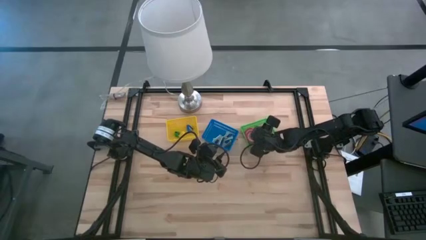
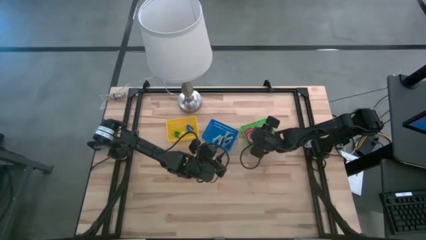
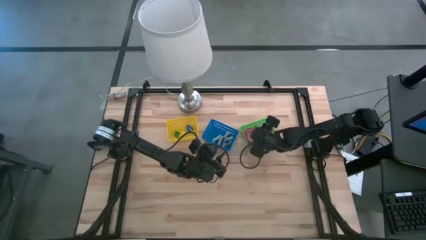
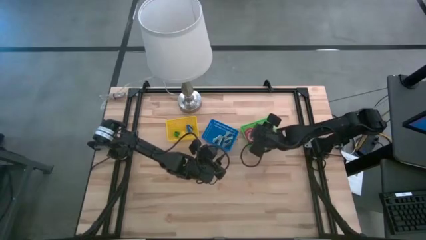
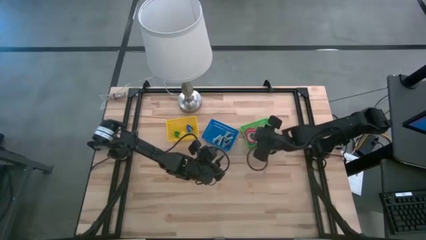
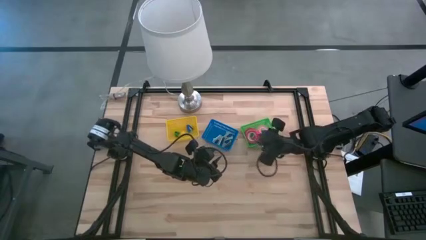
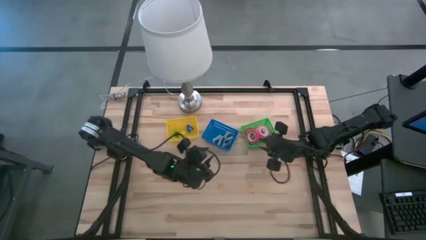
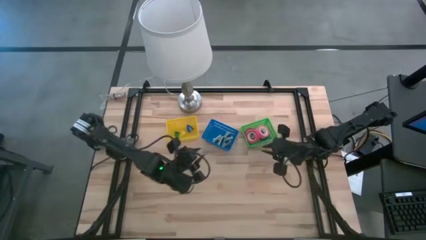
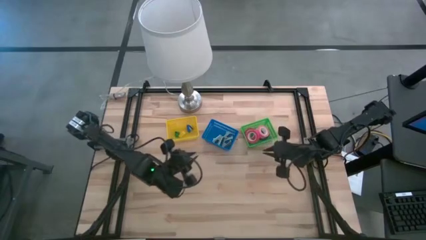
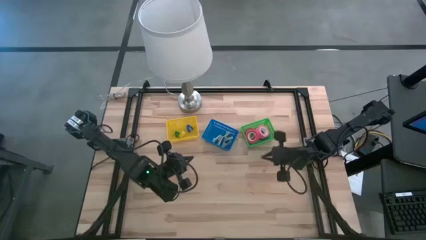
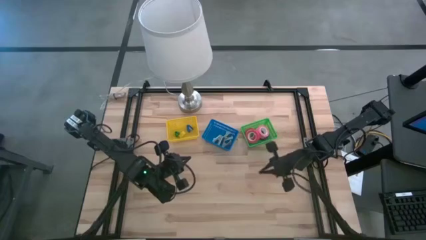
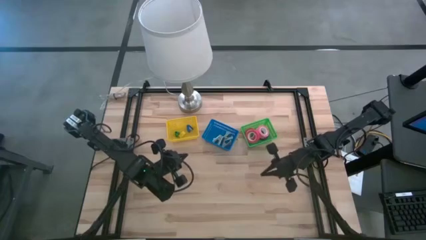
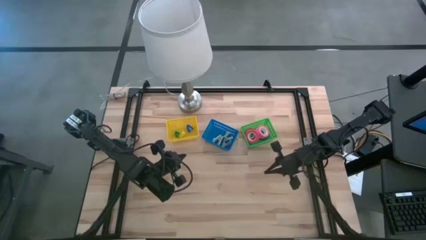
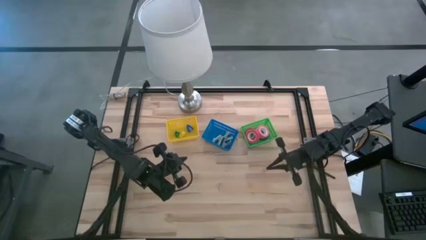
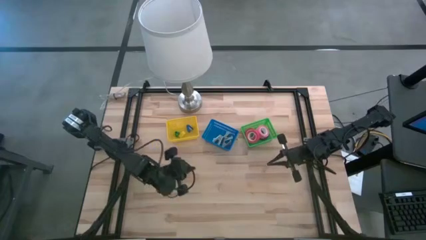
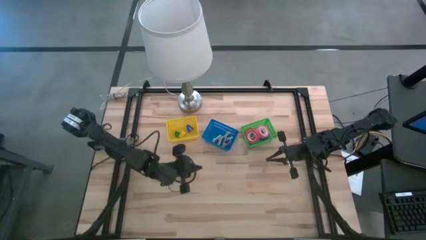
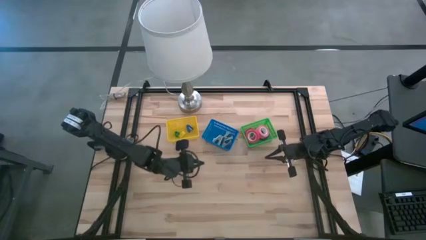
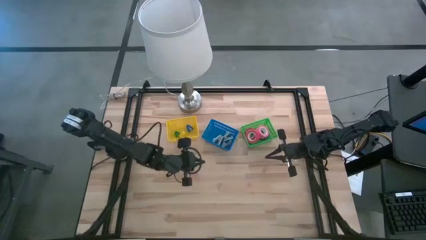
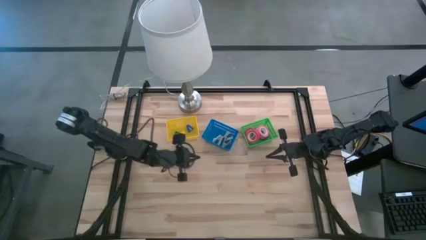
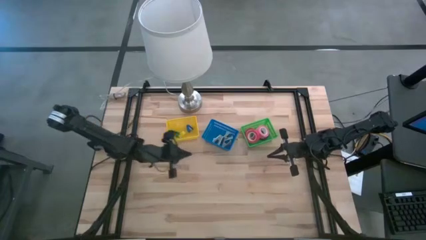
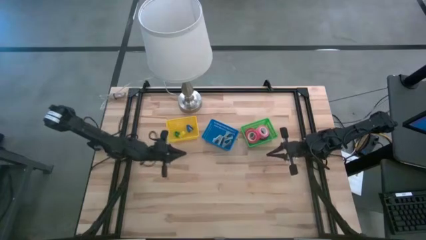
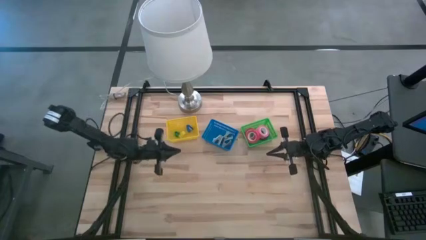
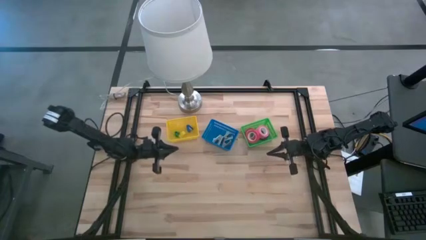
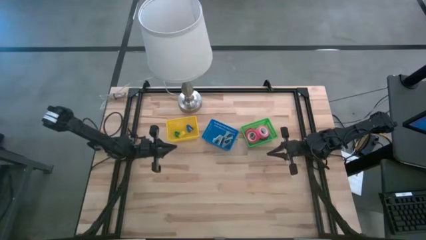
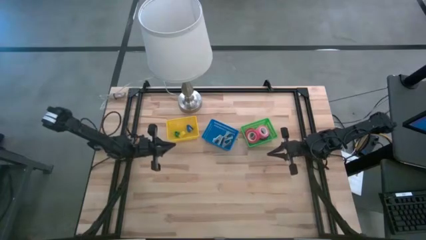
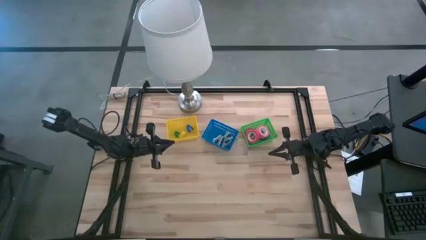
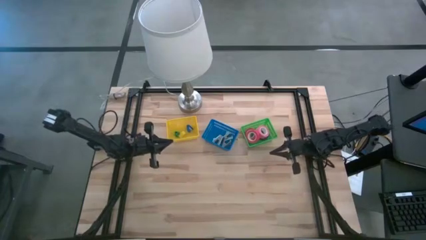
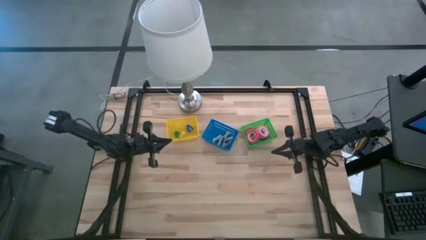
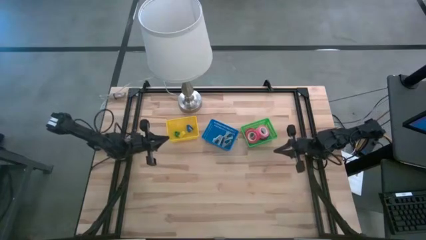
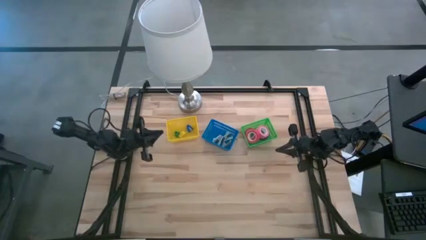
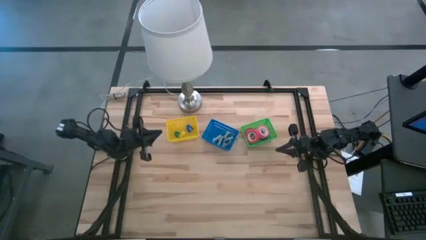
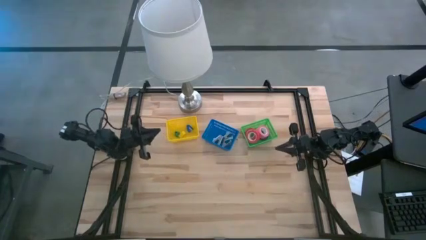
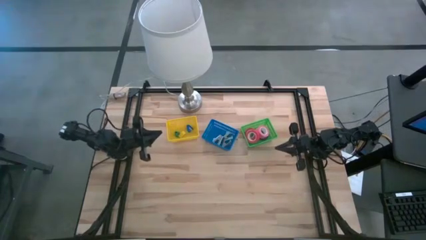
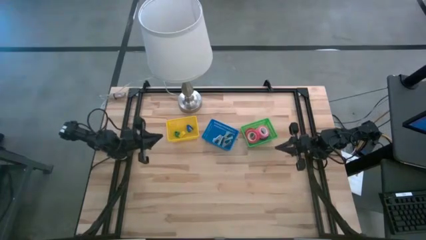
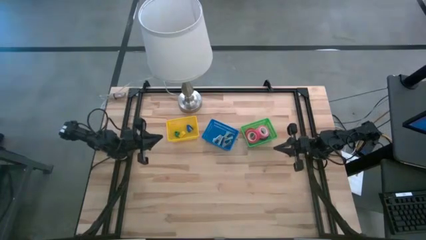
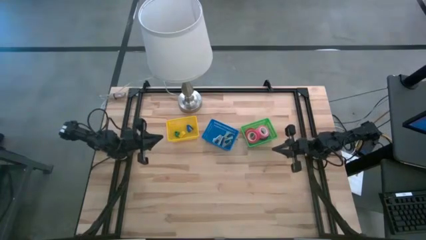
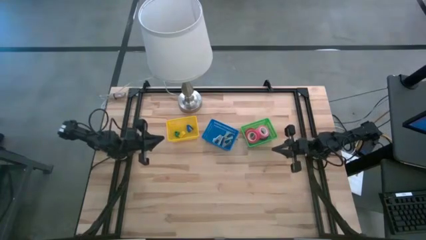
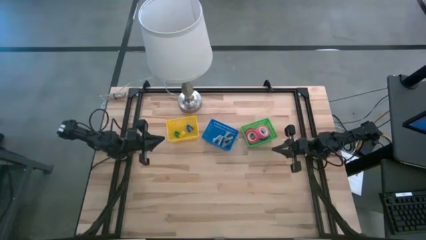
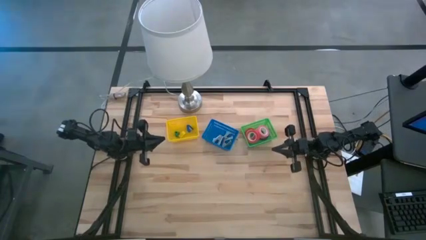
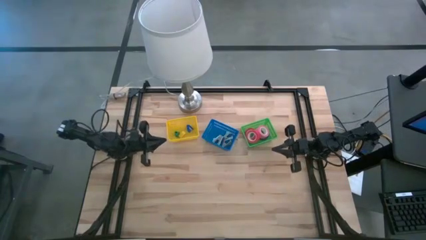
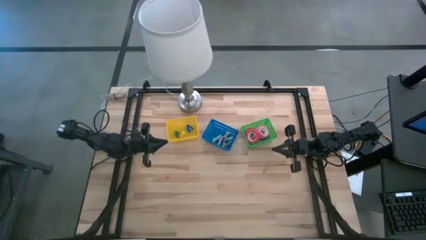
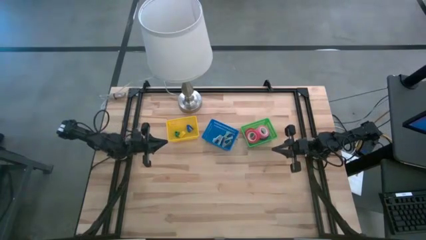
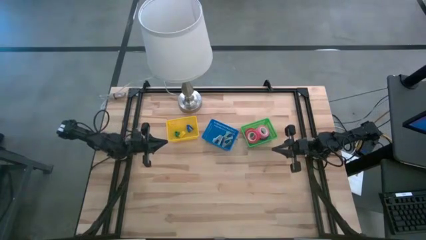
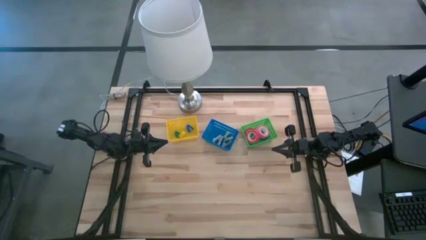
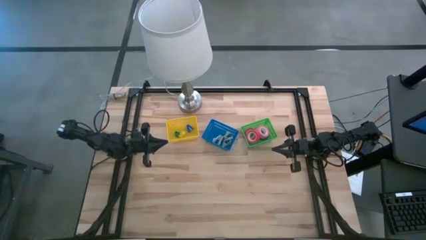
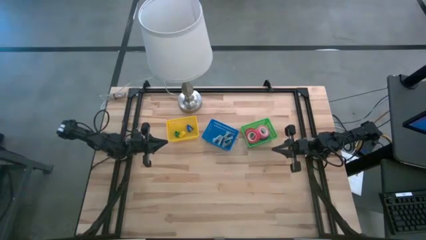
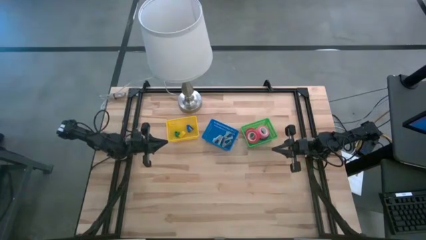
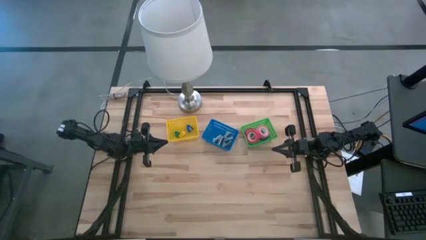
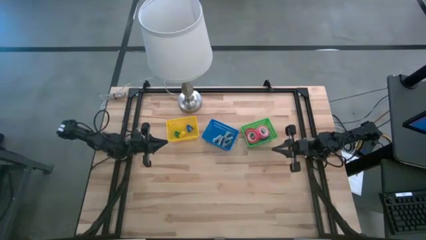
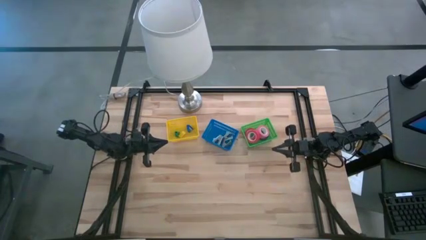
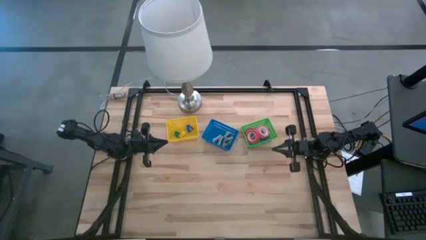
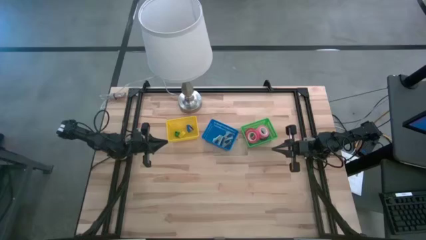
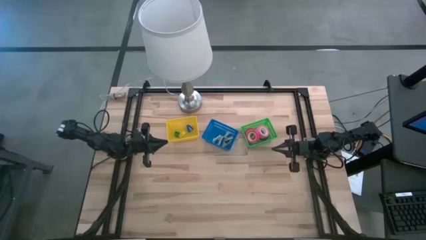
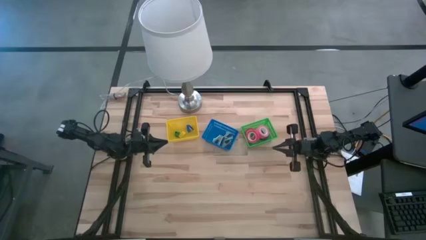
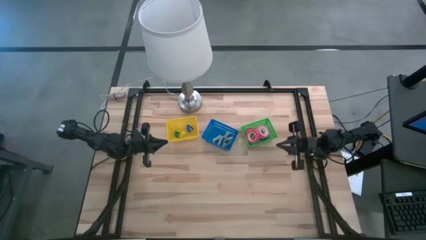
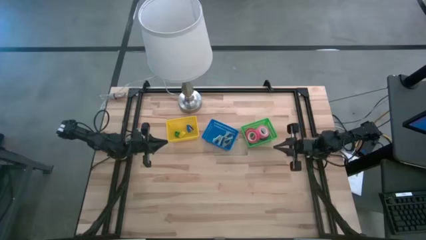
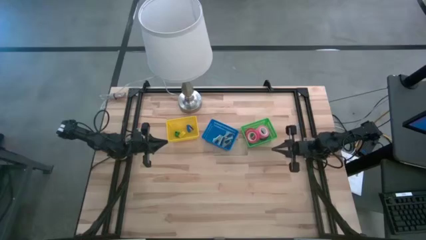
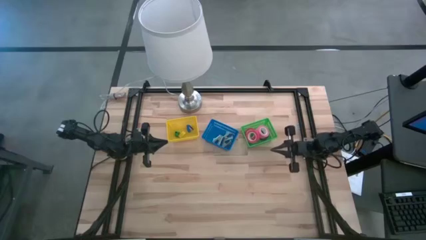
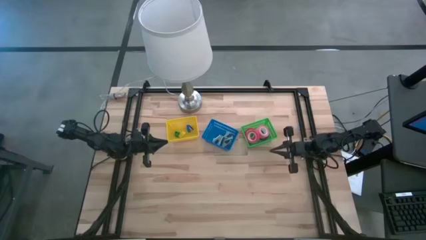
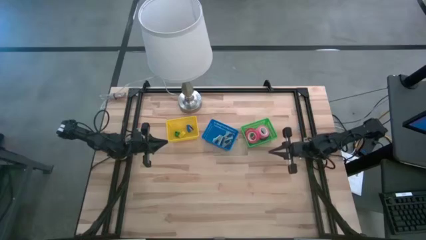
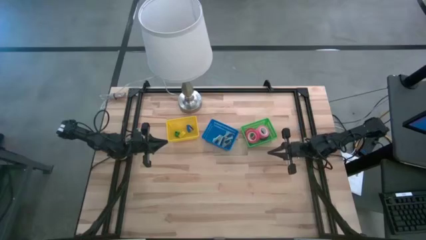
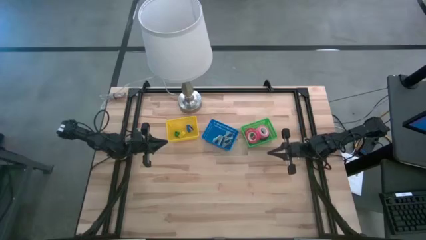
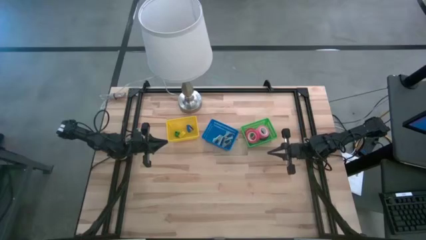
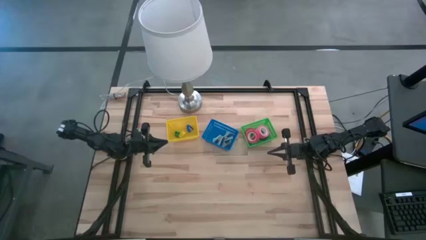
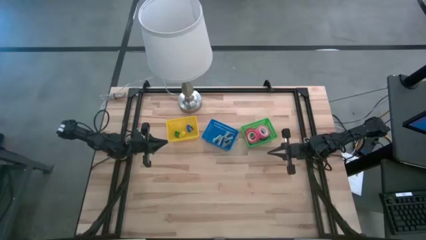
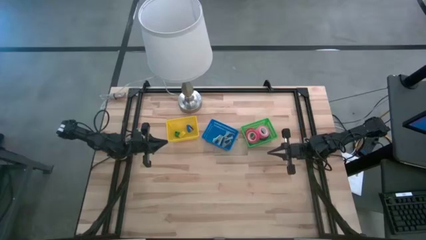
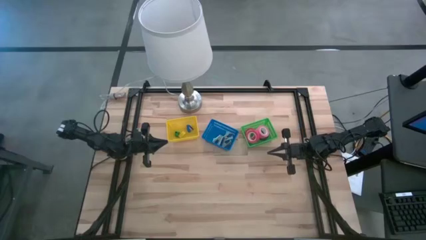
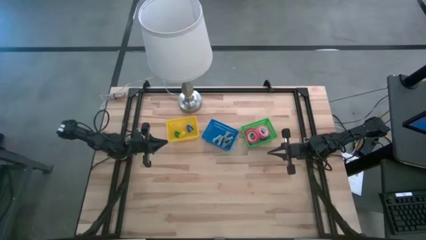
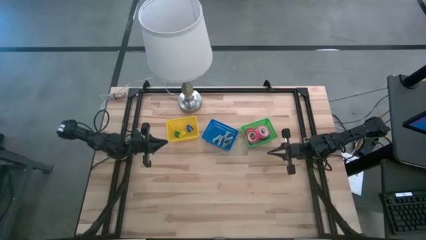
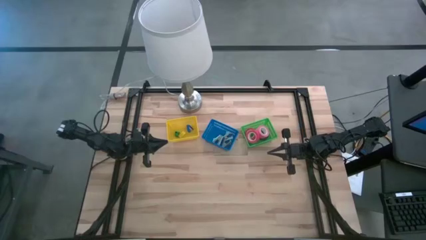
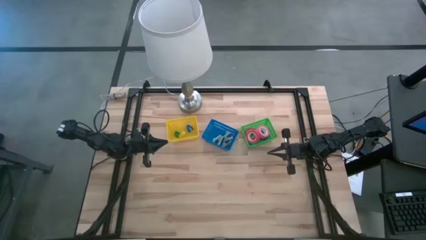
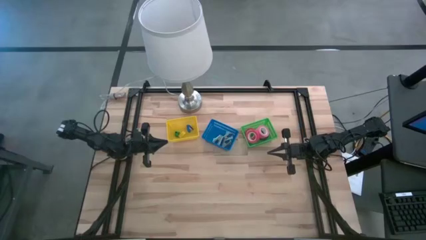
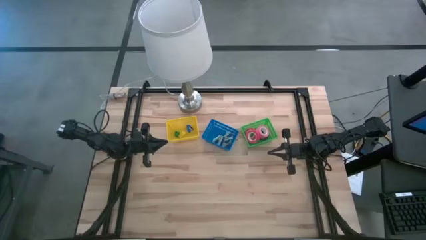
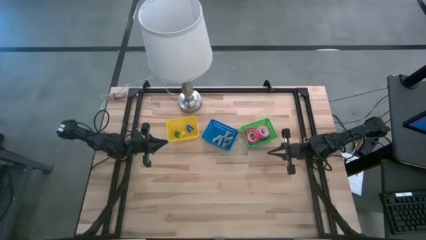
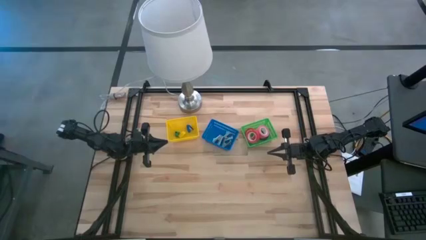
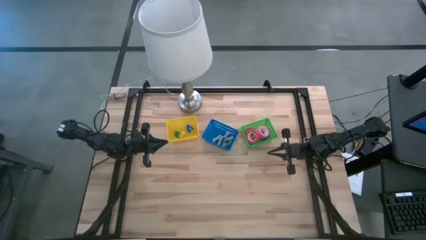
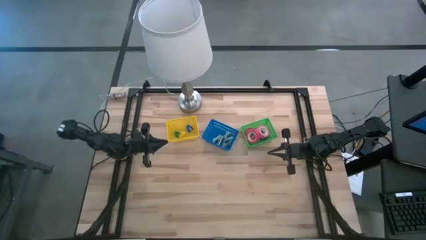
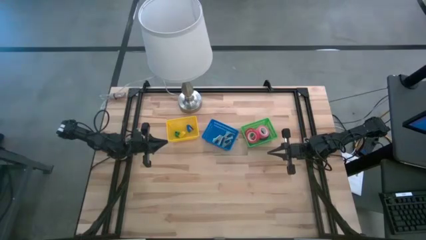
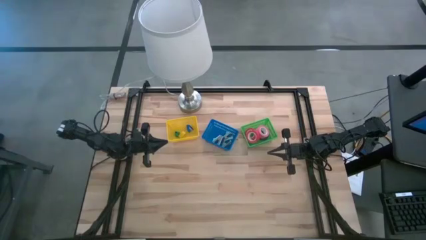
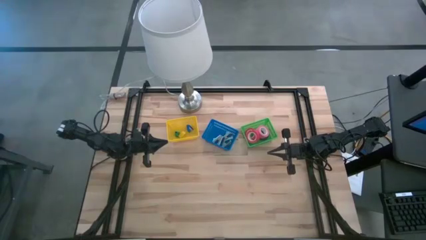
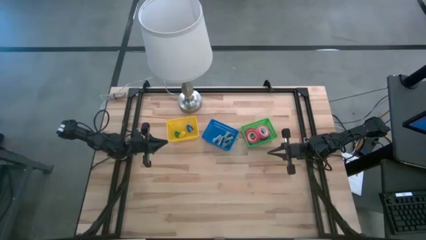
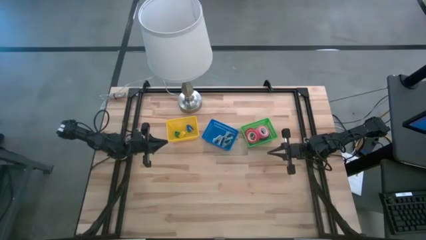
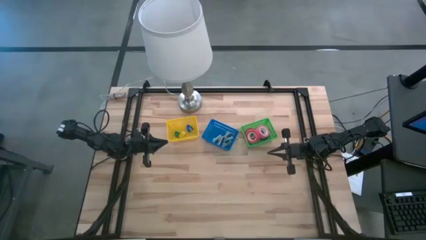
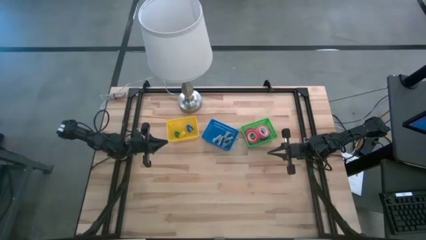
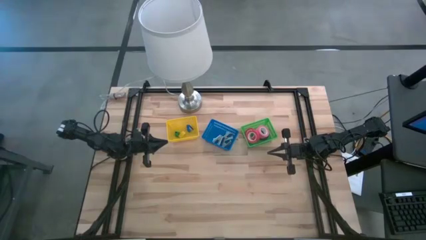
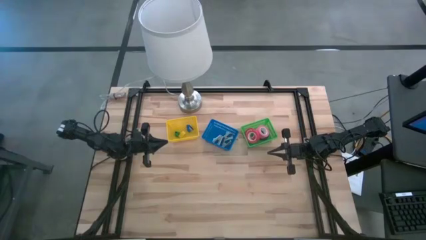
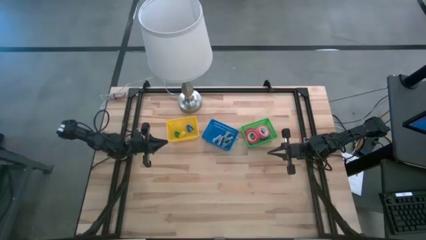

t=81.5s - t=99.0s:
Task: Pick and place Stapler, Stapler remover, tape
Return to Home Position
